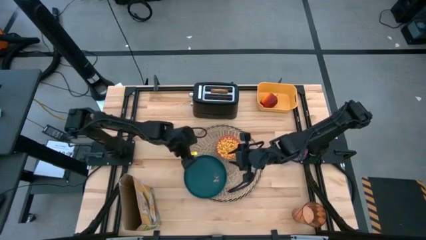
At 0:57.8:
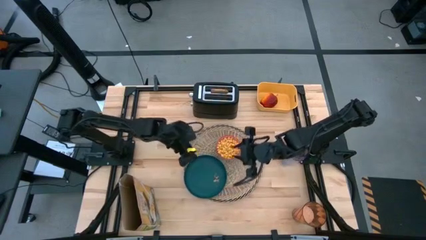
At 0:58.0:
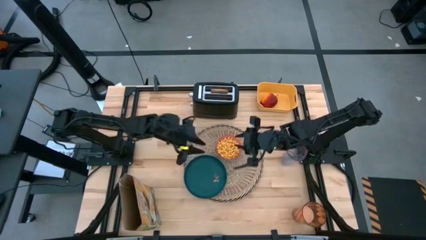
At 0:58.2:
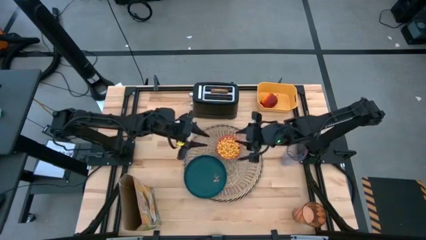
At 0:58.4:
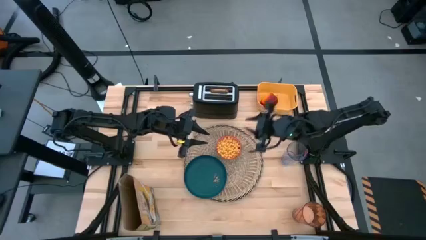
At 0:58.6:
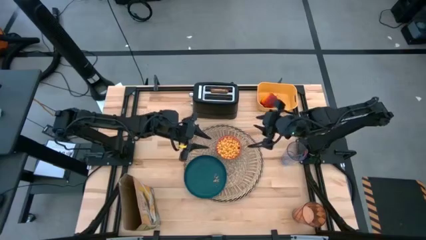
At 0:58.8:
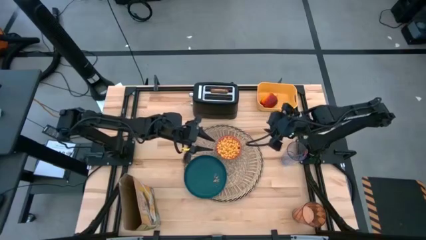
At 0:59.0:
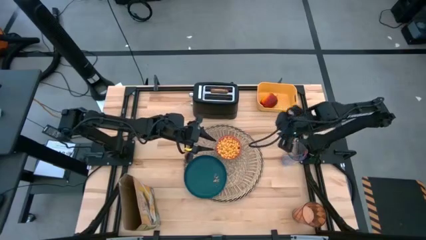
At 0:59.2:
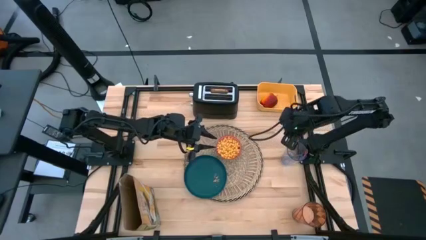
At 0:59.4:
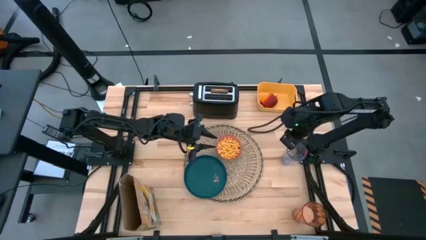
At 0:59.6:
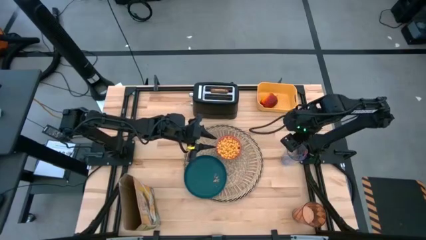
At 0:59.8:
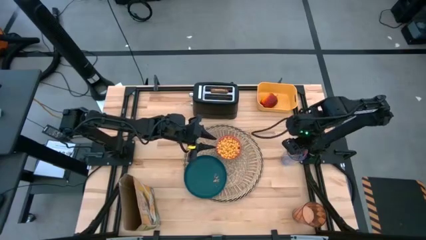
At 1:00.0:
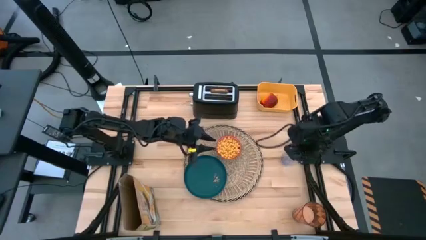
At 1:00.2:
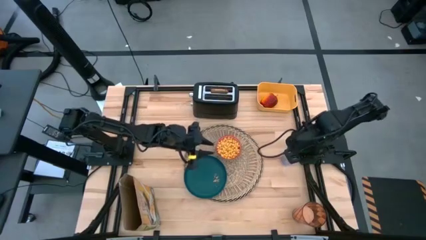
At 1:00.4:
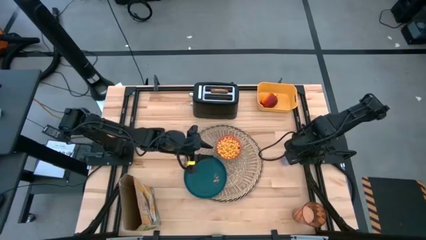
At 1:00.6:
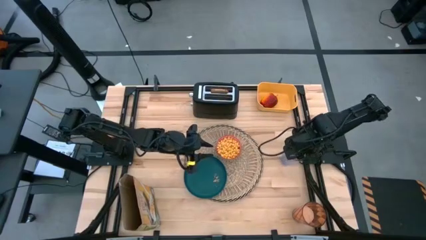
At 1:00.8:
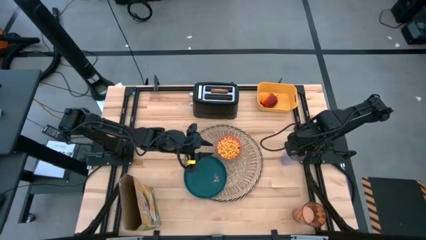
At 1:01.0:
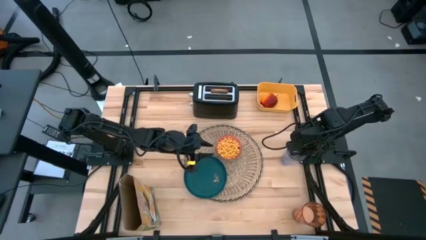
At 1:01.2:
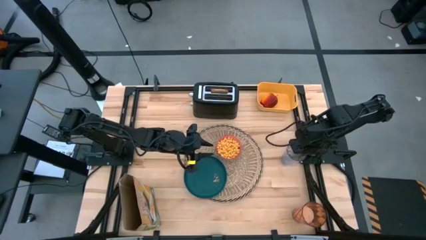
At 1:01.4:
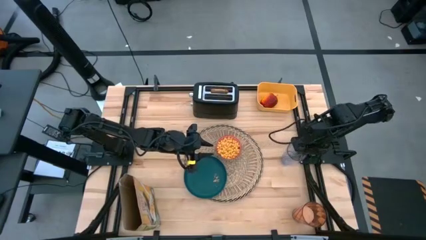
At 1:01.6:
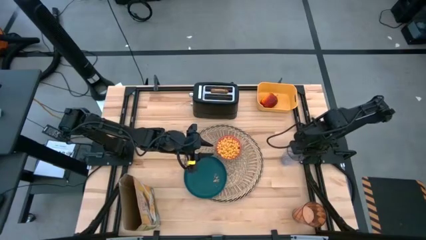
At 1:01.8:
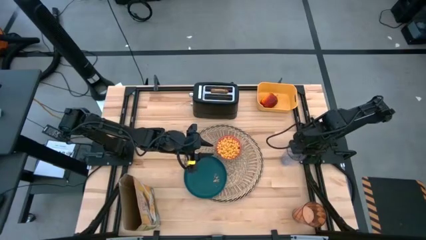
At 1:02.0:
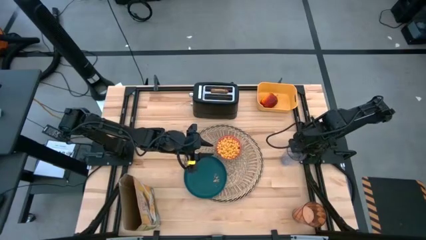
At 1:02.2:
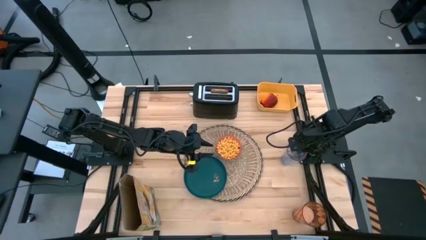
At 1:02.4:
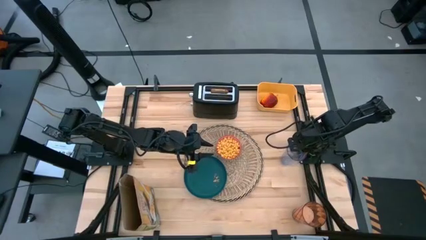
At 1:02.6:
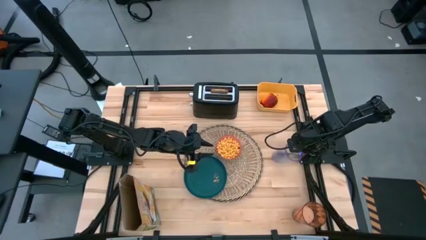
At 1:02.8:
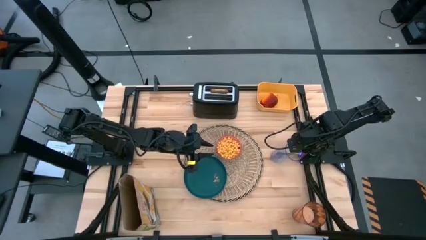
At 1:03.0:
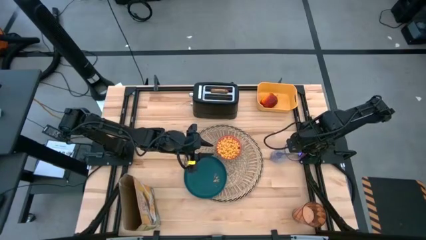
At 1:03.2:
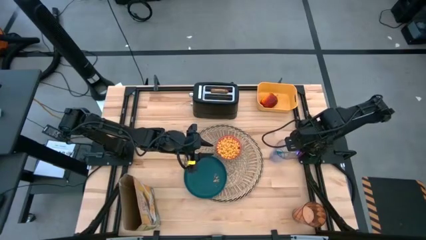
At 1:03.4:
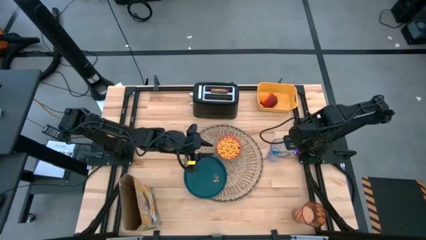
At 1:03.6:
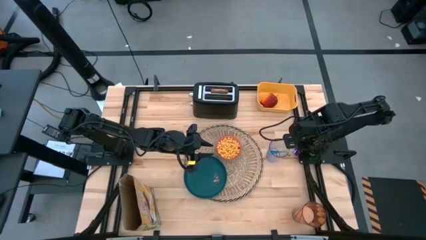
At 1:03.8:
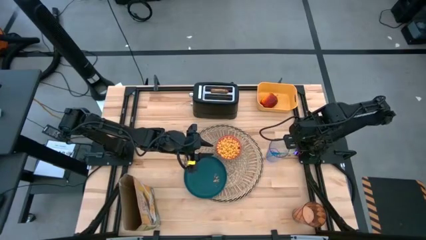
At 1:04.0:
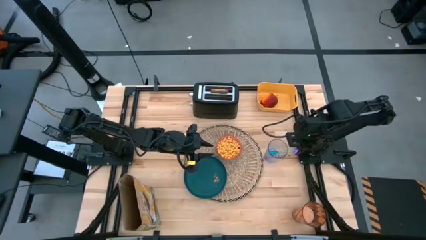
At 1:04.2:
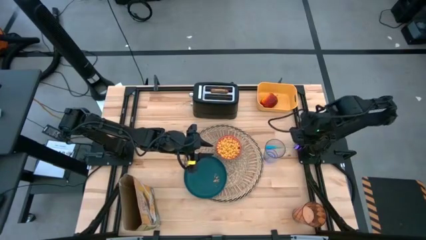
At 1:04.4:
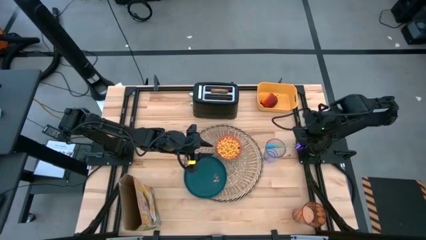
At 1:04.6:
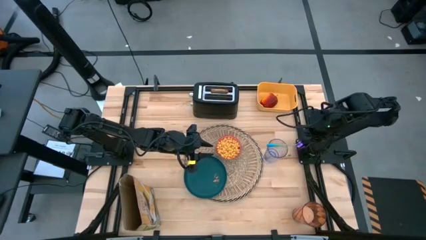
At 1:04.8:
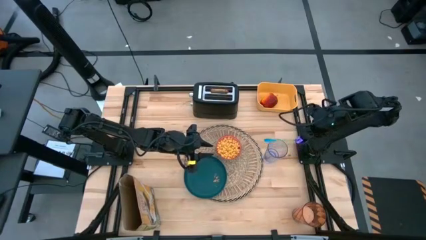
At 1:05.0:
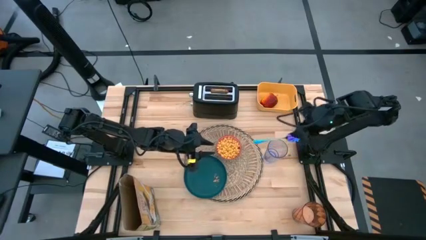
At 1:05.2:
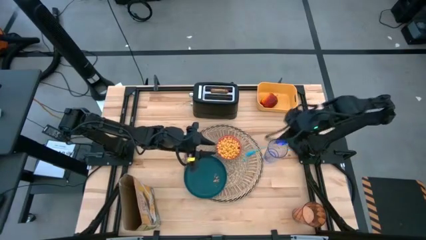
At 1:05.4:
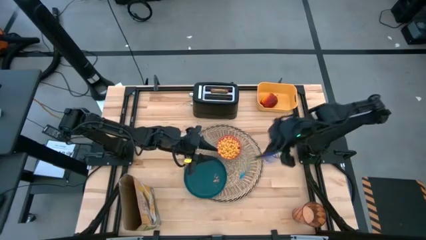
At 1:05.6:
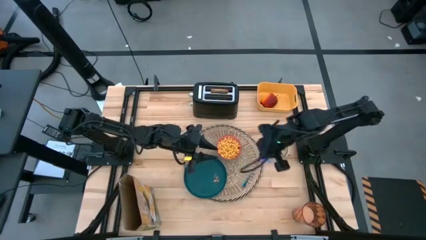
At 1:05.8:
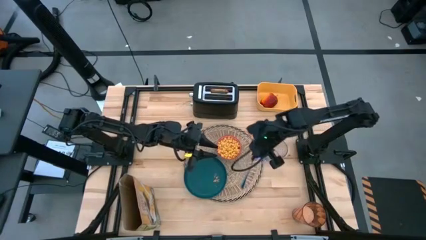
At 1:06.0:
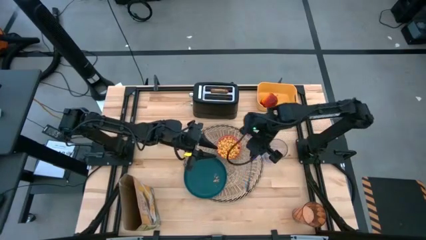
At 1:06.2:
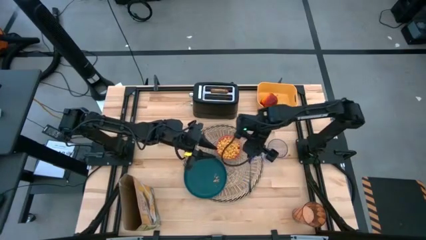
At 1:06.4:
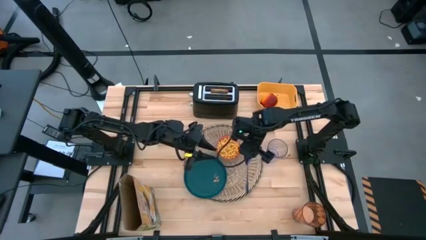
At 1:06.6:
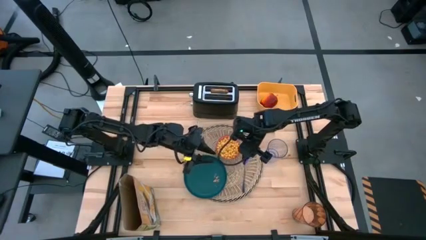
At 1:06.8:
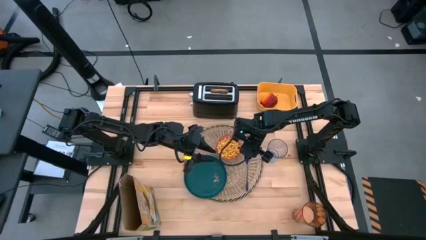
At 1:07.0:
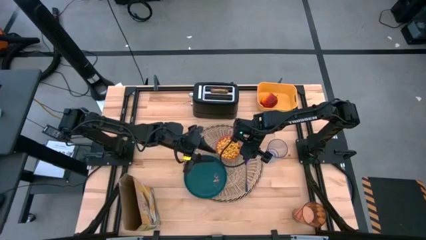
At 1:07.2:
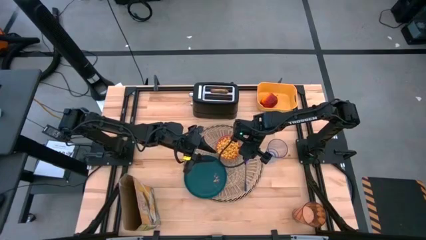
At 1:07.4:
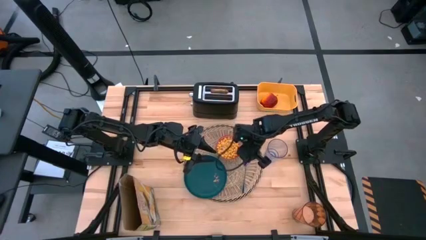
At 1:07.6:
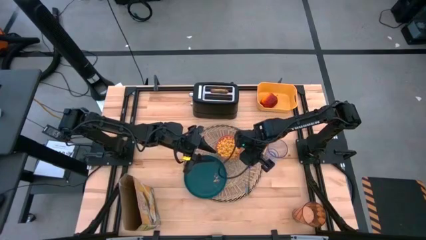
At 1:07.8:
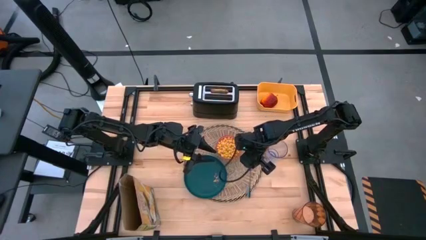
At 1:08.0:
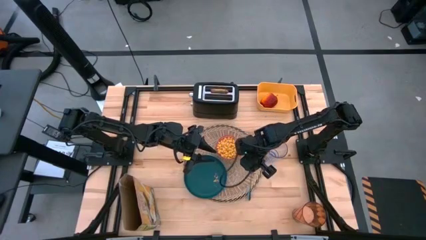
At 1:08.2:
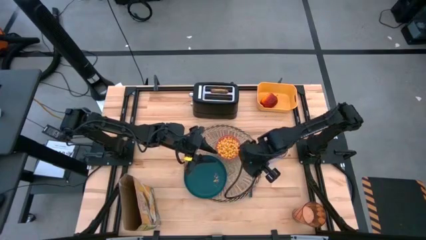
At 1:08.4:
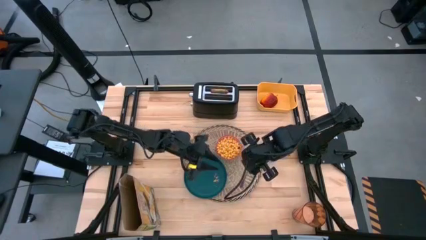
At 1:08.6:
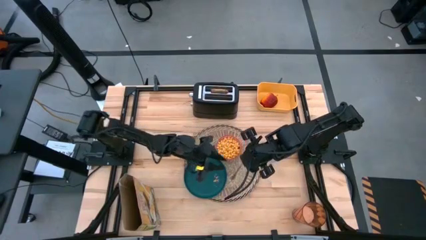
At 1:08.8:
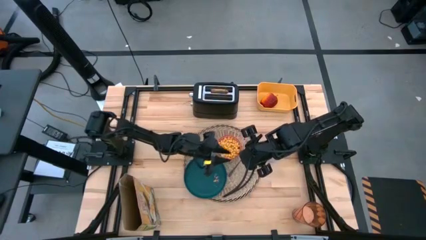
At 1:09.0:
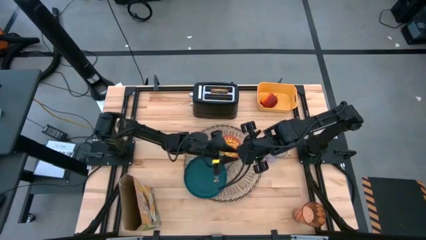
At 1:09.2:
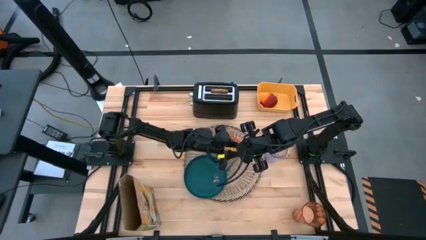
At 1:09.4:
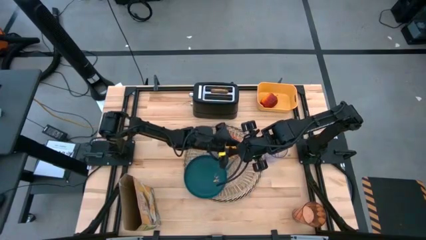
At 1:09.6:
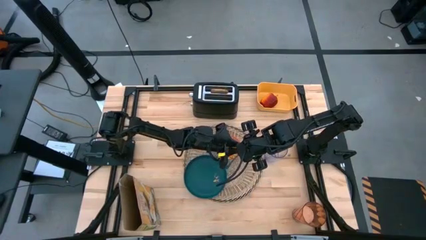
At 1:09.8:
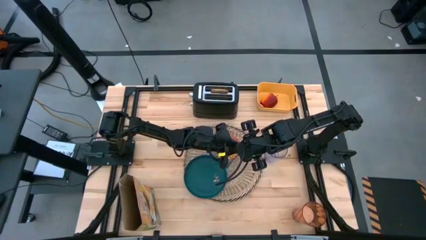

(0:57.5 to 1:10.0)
Task: Arrange a breakfast setting
Put the blue spoon on the brown table mat to the right side of the red bowl

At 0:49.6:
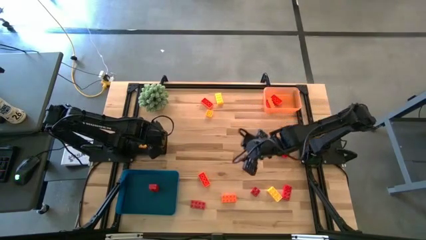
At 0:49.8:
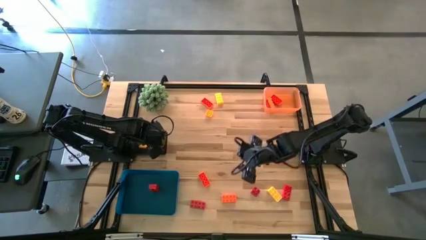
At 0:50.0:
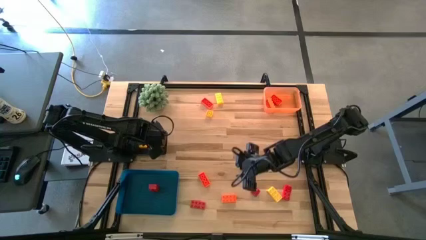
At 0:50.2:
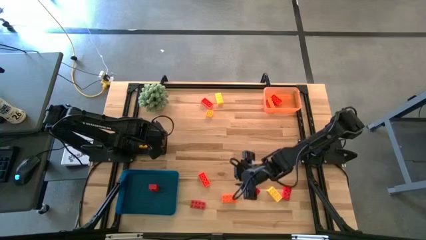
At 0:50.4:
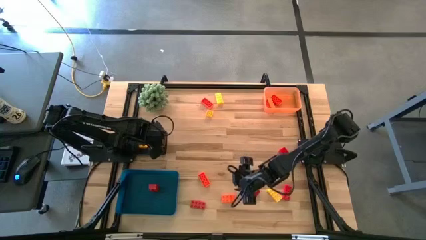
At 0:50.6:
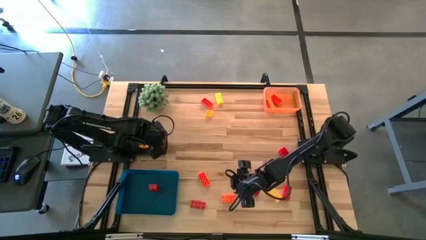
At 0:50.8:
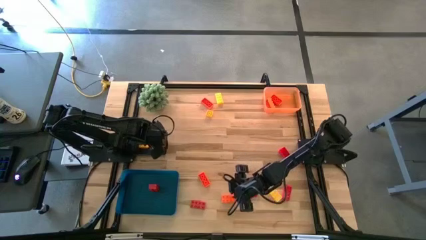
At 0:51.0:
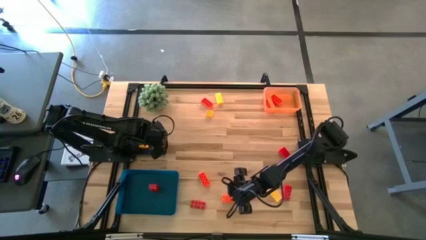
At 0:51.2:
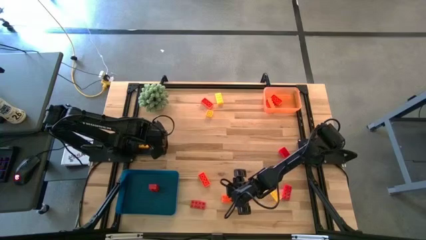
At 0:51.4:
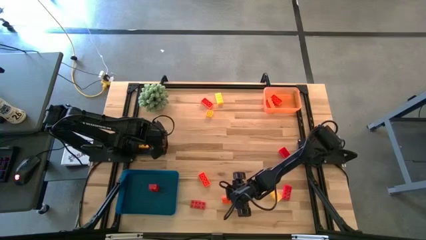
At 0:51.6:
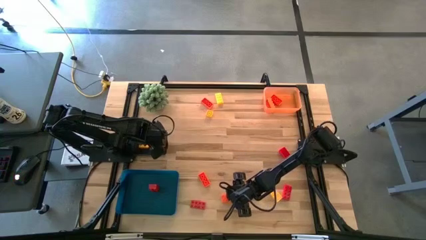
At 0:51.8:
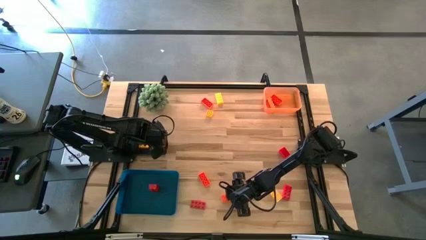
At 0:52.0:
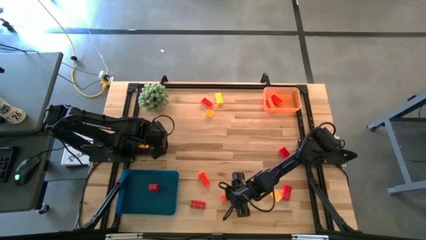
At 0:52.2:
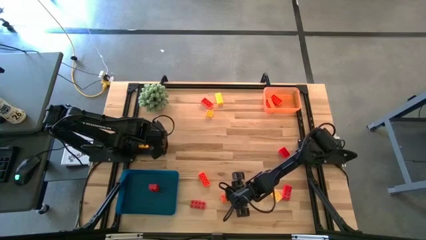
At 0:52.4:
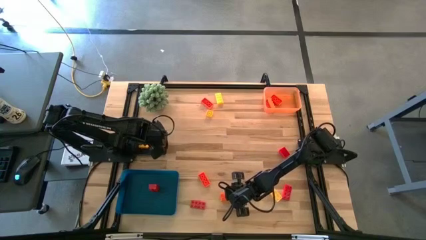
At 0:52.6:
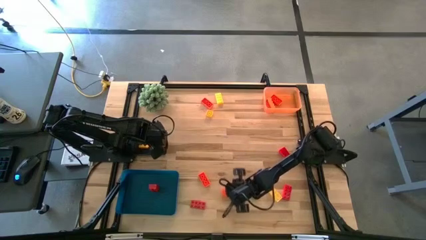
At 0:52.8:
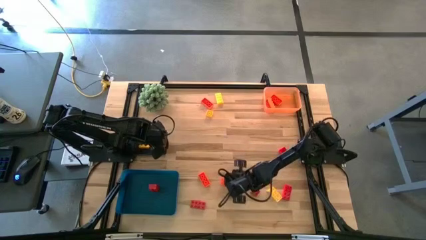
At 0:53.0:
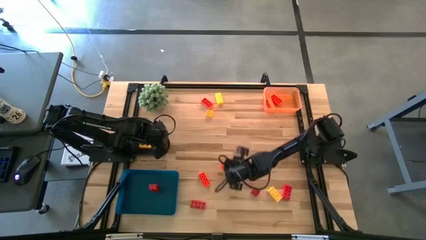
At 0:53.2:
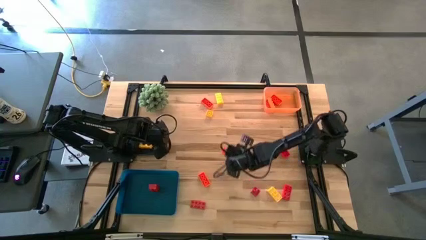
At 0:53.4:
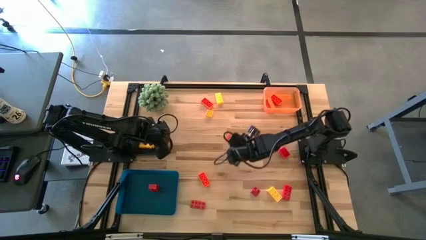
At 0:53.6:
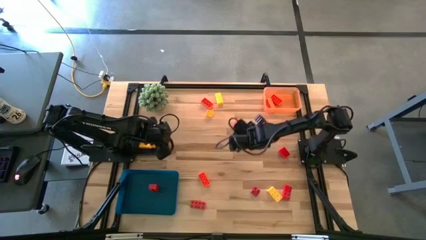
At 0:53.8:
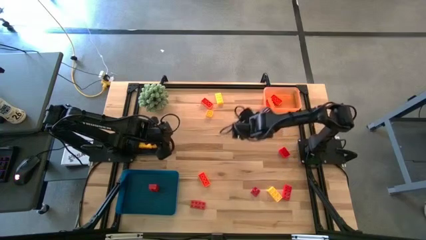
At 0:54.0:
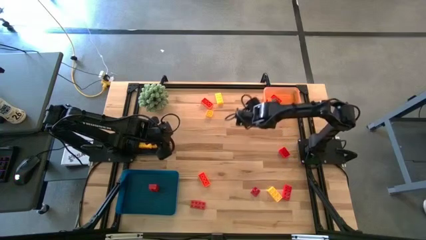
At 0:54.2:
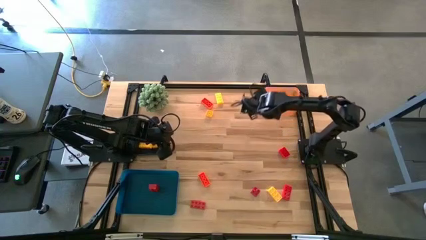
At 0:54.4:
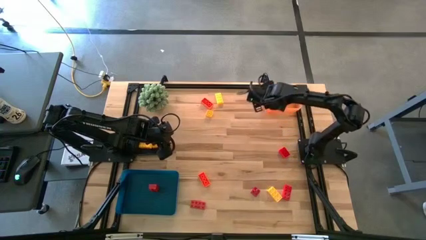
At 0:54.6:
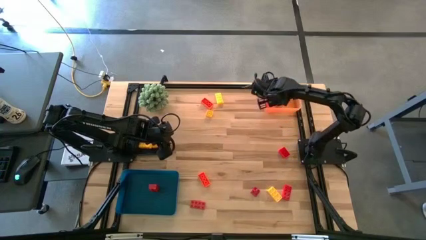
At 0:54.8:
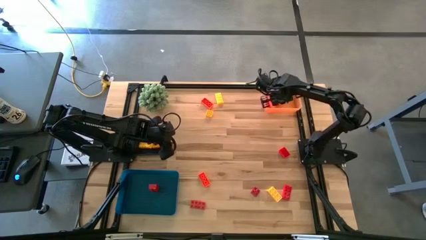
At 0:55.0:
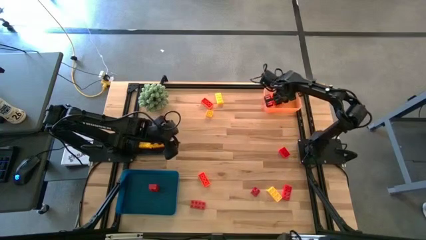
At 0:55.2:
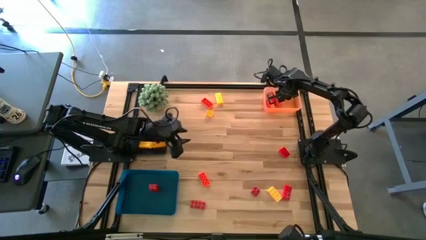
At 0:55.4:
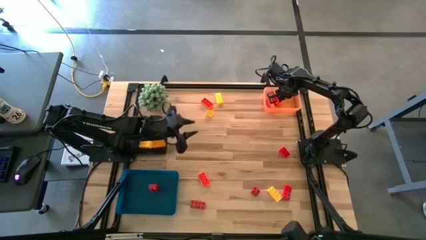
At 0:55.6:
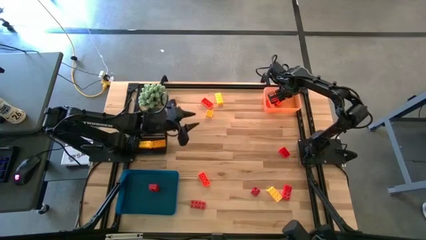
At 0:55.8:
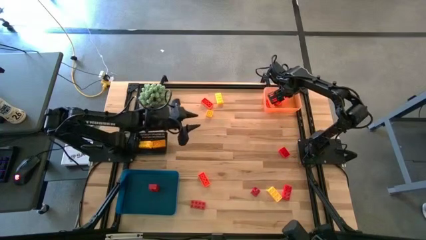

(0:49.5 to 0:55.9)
Task: Sort & place blocks by color
Put the orange game piece into the orange bin
